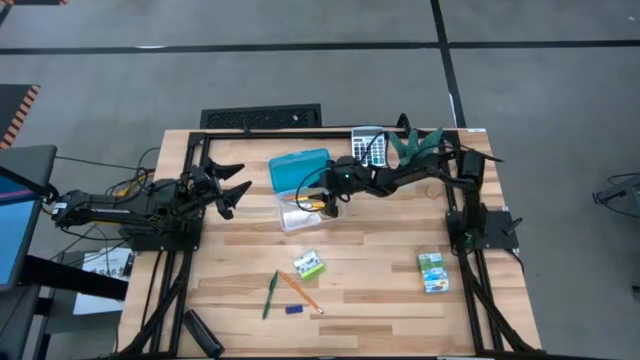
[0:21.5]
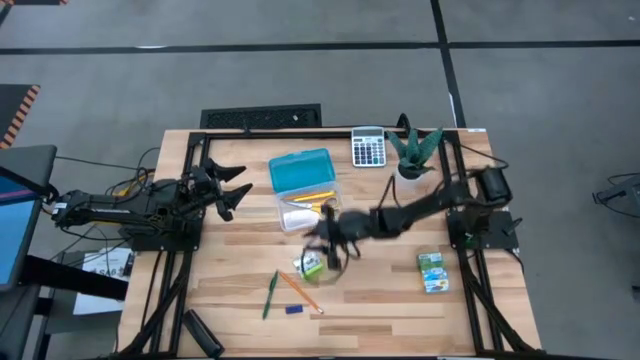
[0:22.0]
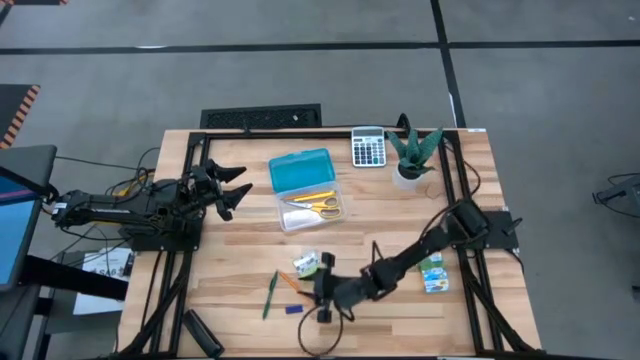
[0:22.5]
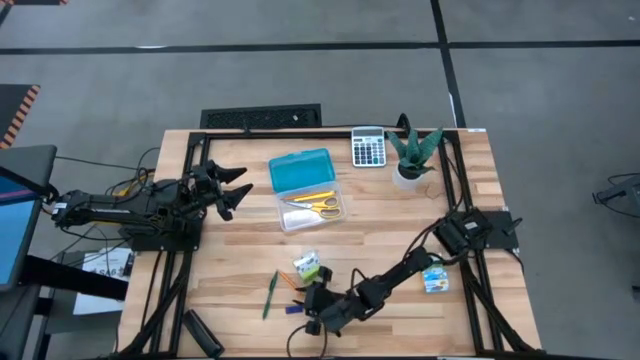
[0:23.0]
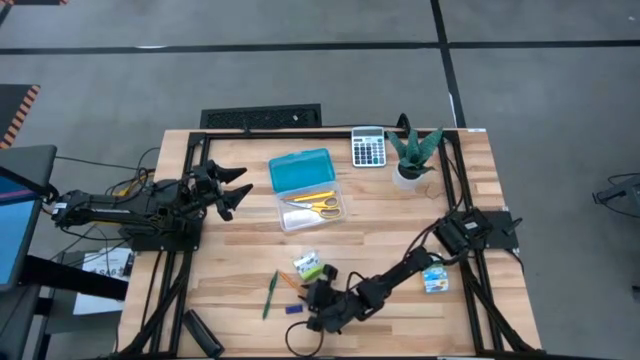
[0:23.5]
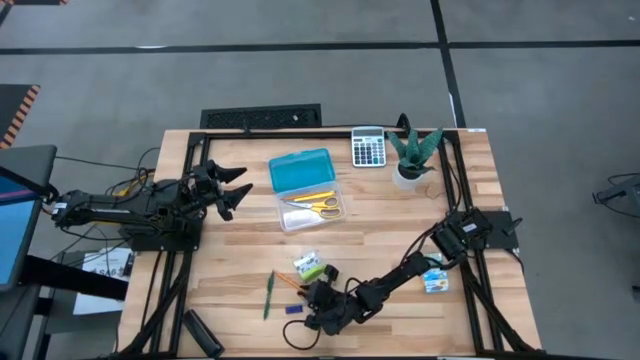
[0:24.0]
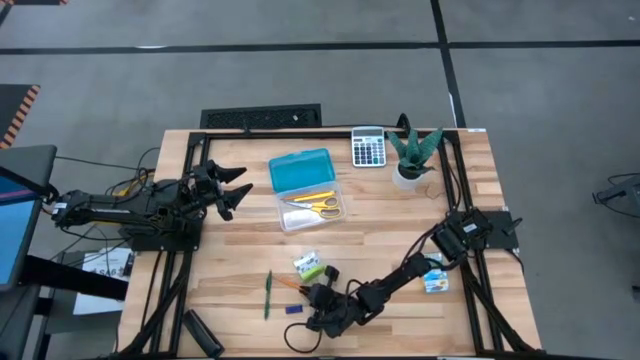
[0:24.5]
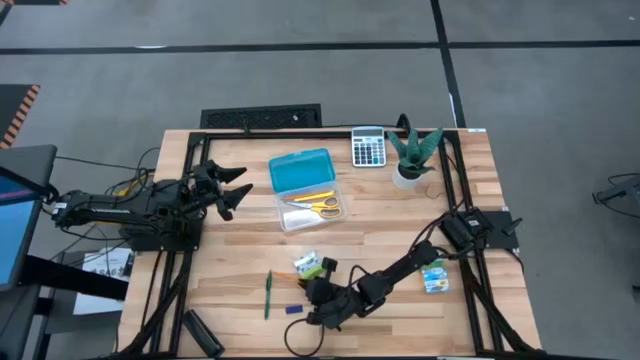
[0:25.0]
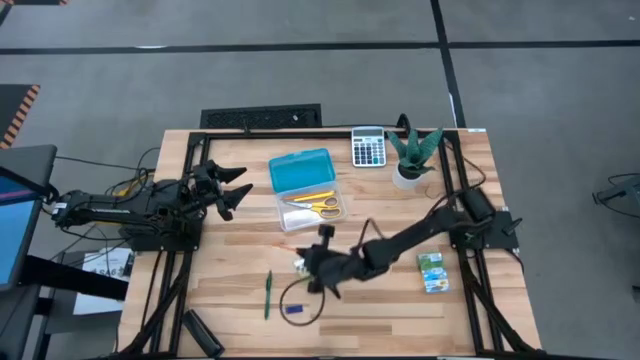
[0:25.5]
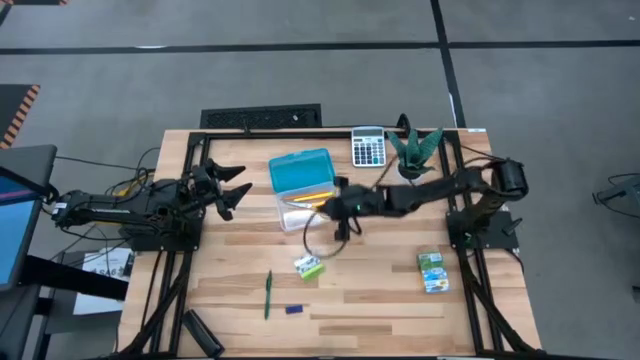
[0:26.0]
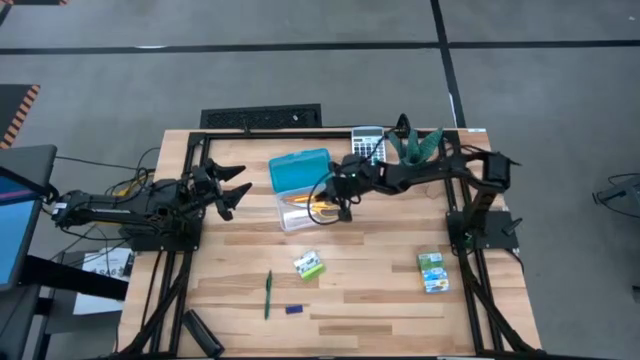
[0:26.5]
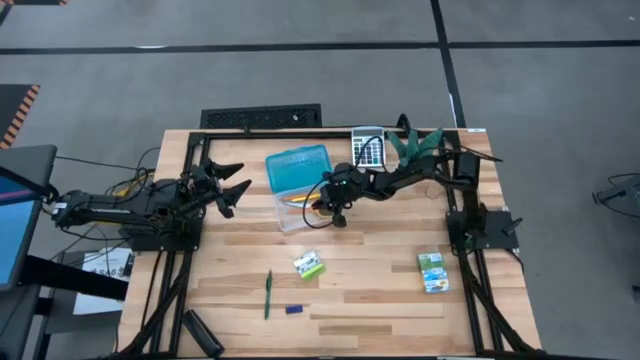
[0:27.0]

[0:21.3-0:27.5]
Task: Pack school essentials
Put the orange pencil into the supply box

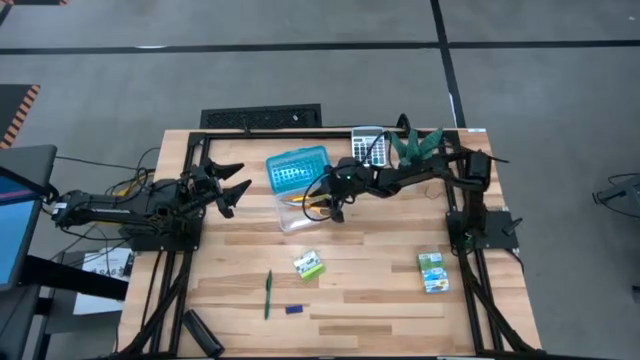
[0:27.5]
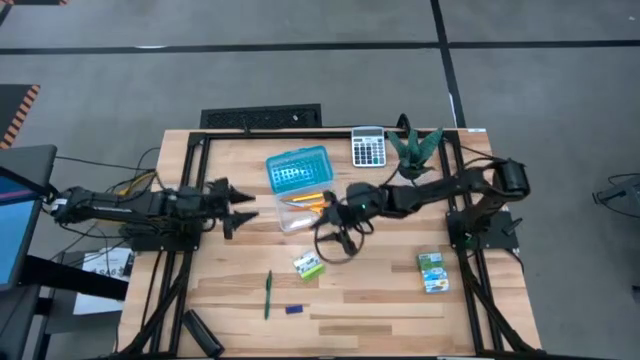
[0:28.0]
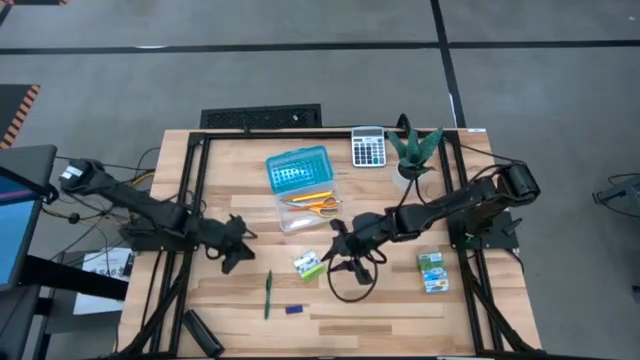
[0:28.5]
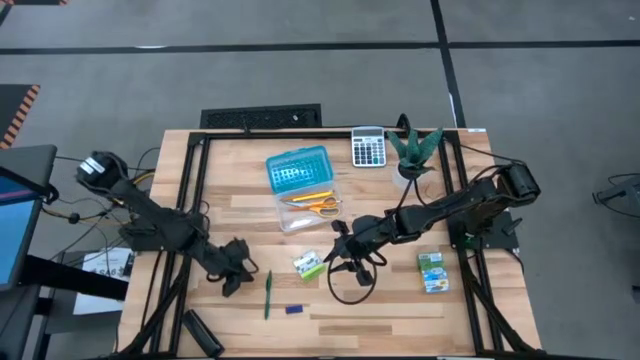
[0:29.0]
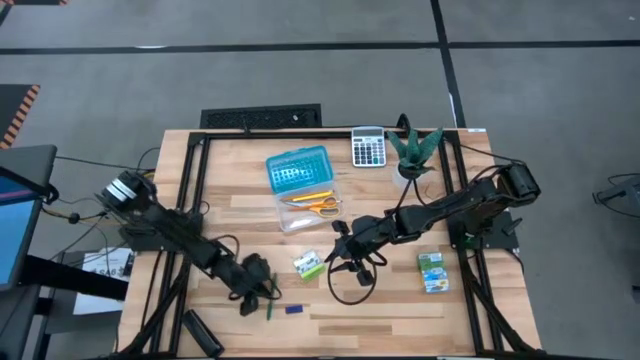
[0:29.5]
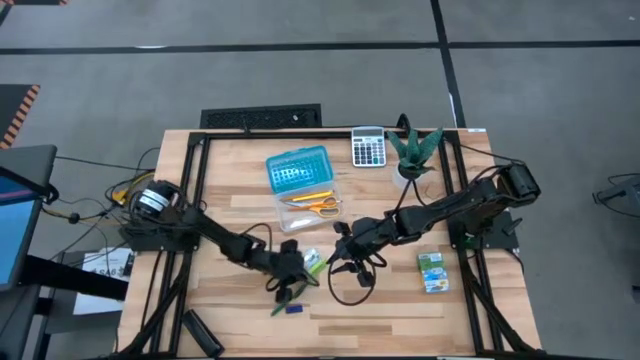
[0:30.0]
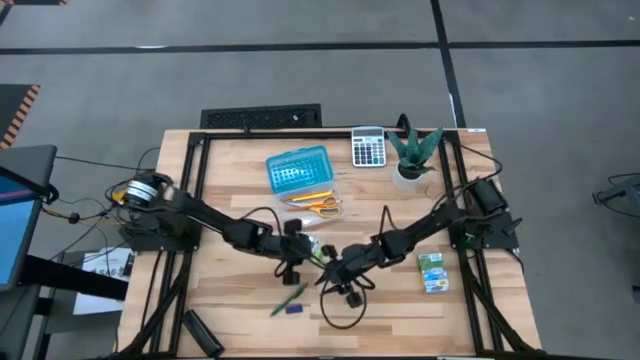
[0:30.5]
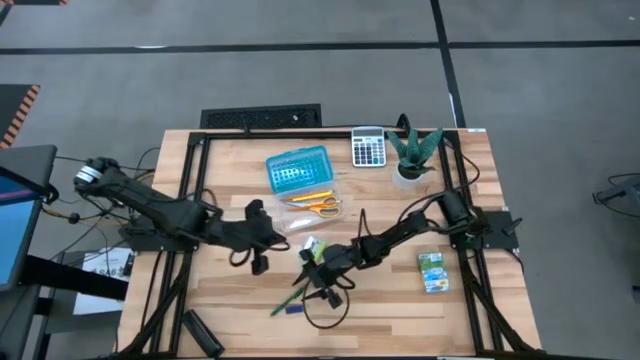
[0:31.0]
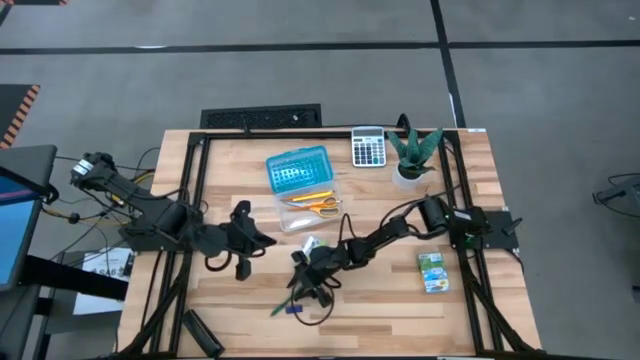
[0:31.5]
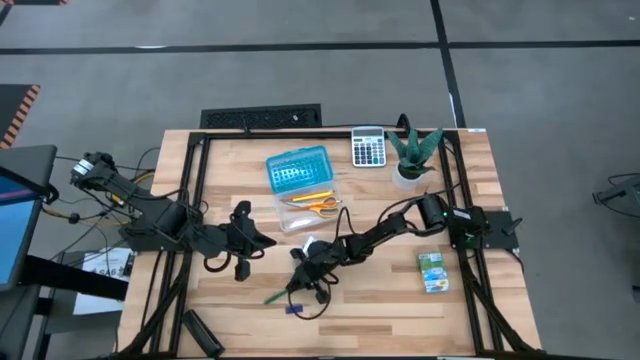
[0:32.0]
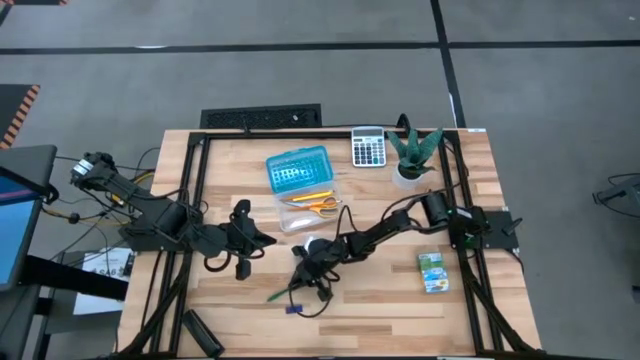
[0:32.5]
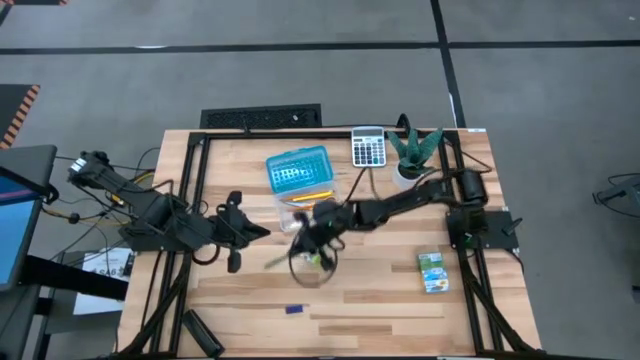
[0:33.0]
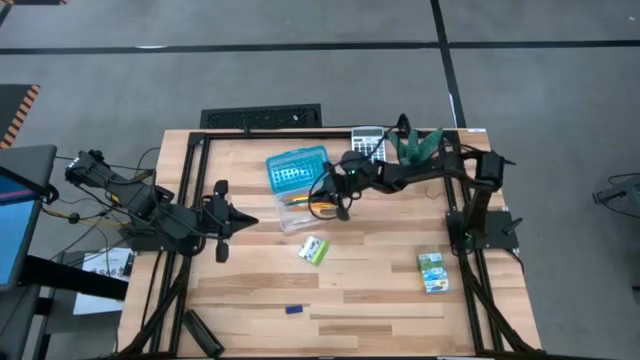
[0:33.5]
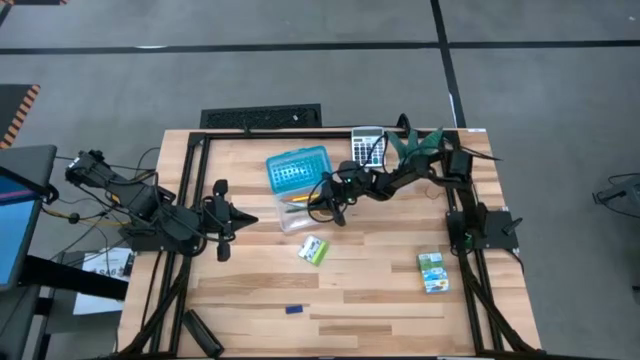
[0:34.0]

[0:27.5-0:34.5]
Put the green pen into the supply box

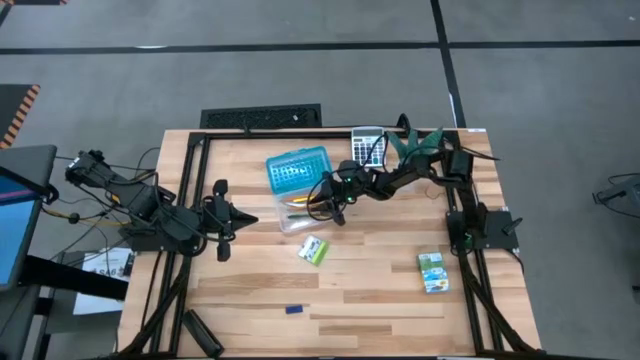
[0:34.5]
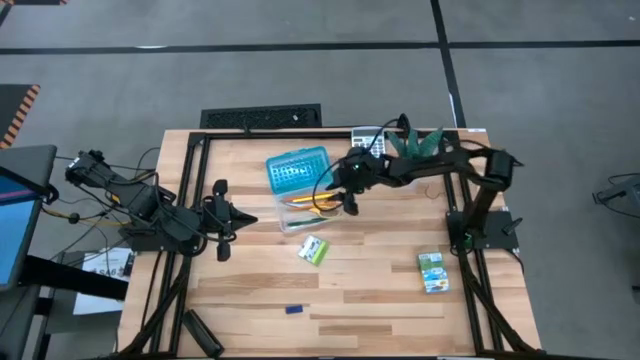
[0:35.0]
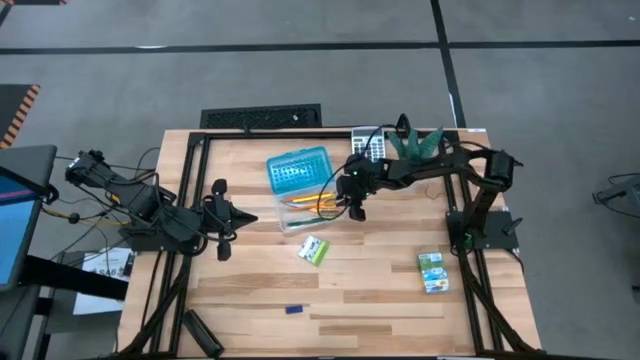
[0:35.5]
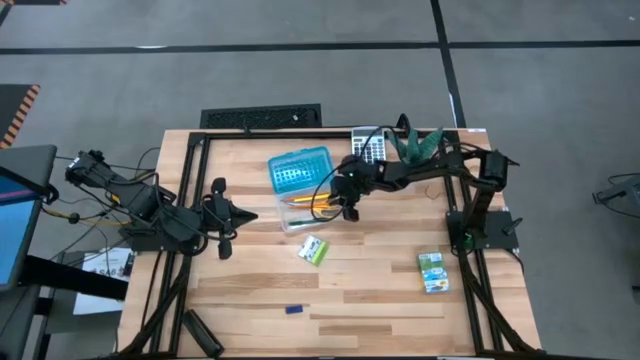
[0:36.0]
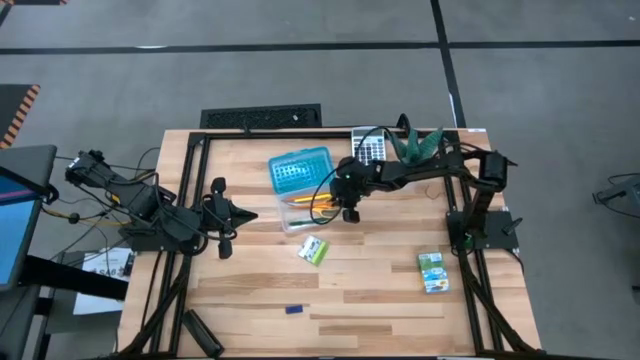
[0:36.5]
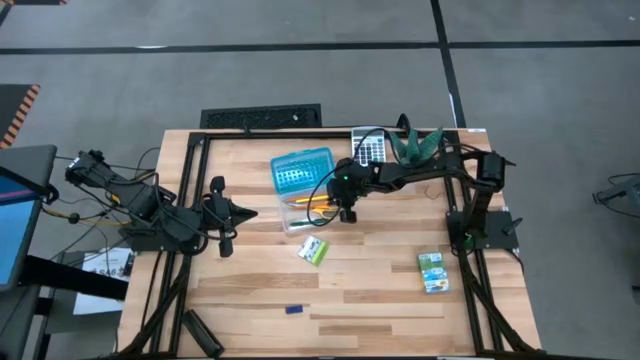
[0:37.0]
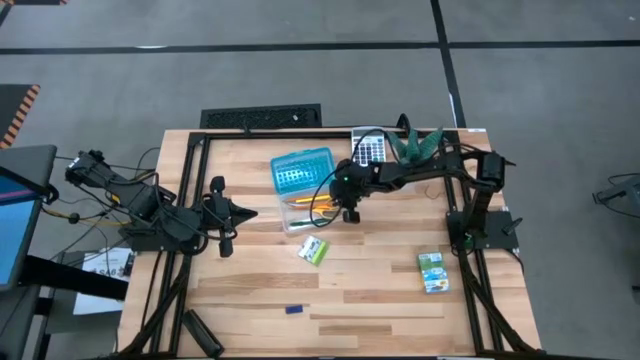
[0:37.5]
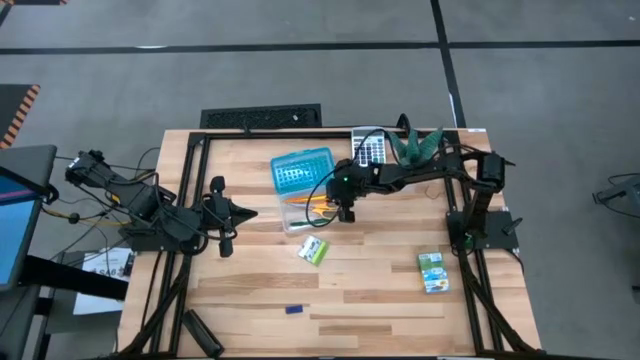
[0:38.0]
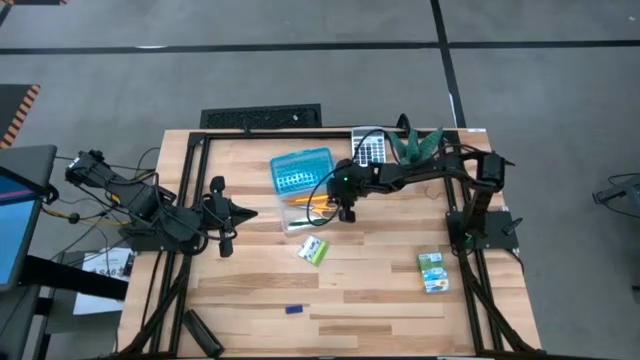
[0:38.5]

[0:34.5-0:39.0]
Adjust the orange pencil in the supply box

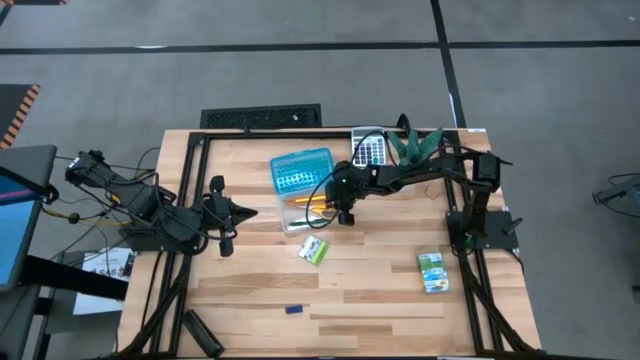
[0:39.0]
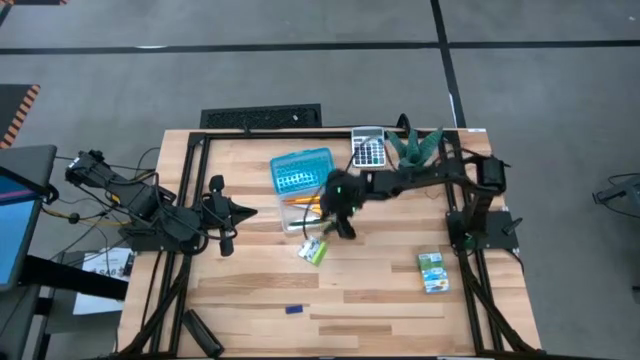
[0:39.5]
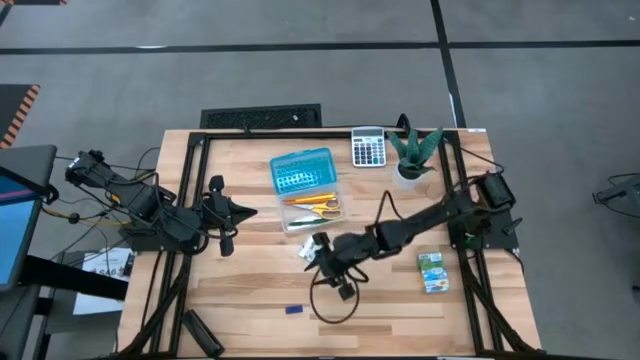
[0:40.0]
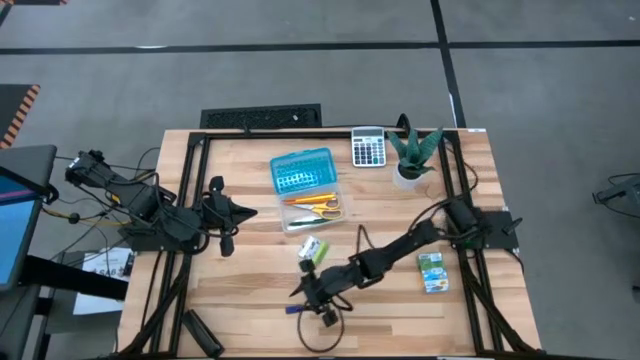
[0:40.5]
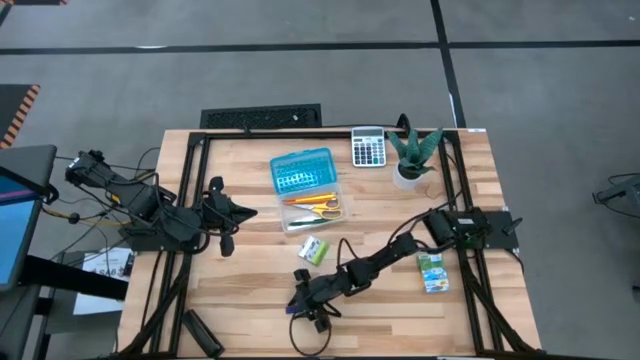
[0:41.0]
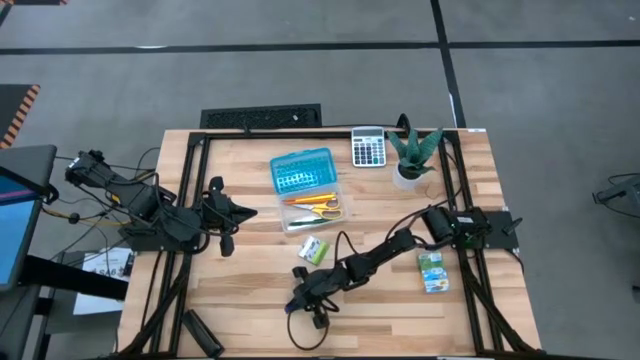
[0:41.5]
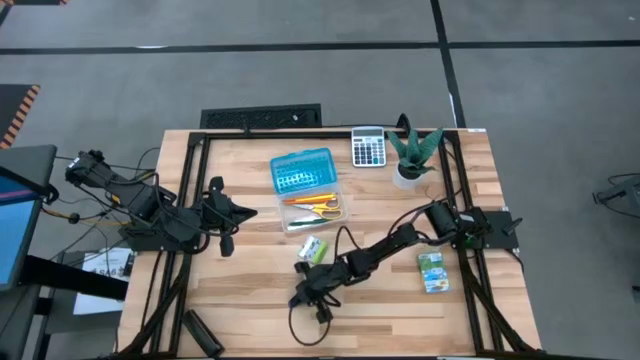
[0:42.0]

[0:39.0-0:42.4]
Put the violet eraser into the supply box
